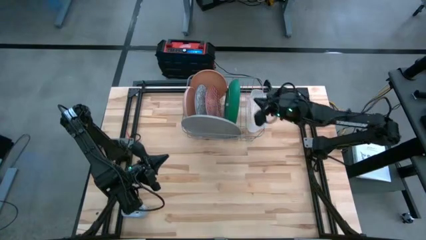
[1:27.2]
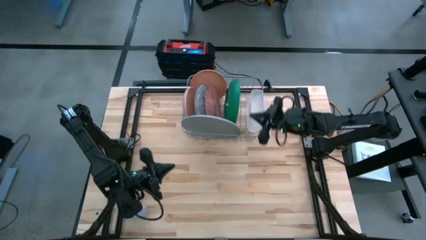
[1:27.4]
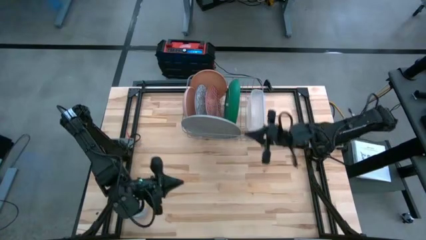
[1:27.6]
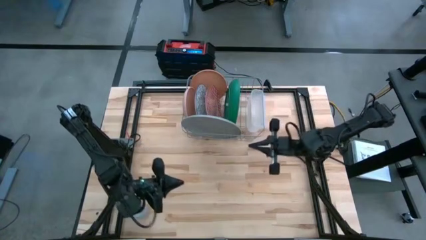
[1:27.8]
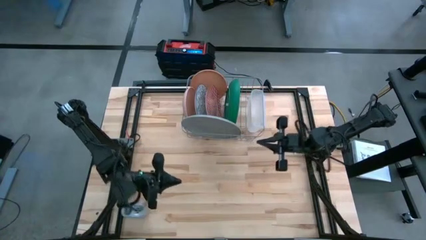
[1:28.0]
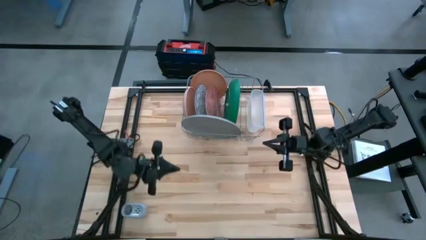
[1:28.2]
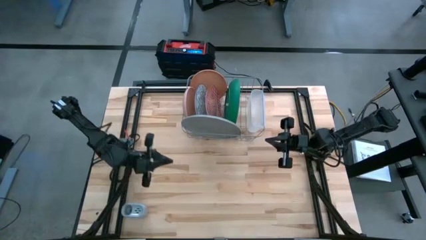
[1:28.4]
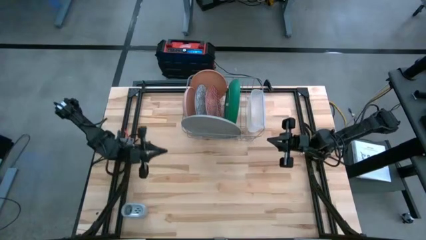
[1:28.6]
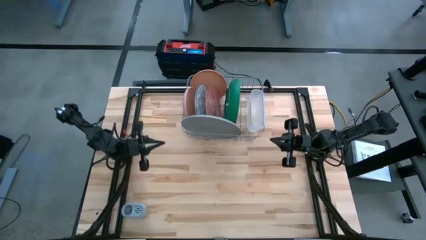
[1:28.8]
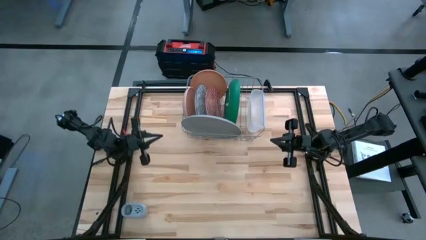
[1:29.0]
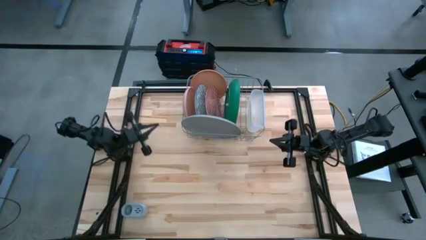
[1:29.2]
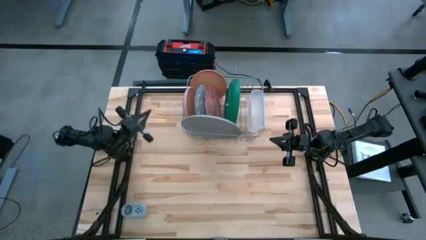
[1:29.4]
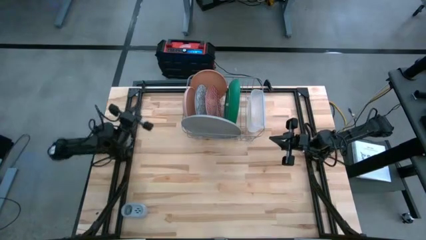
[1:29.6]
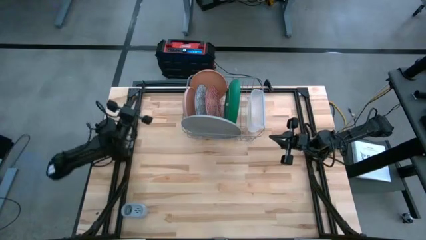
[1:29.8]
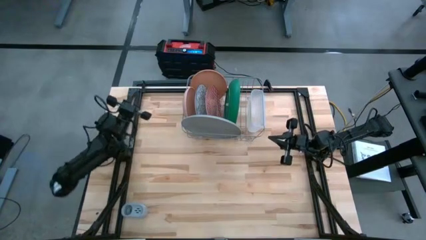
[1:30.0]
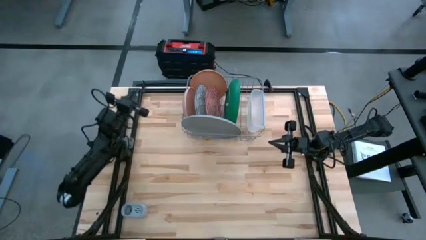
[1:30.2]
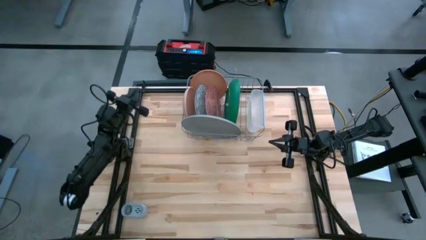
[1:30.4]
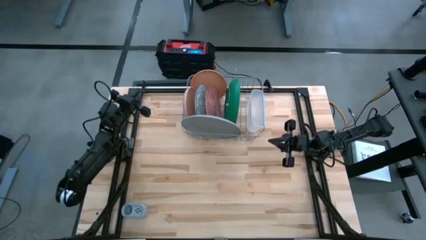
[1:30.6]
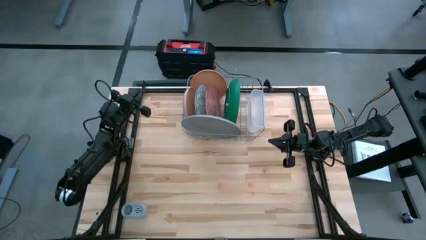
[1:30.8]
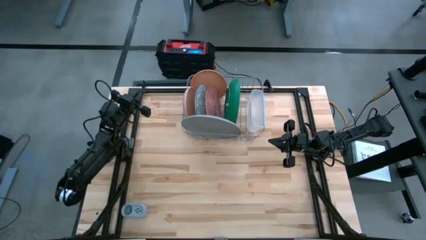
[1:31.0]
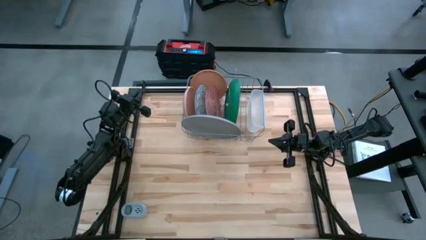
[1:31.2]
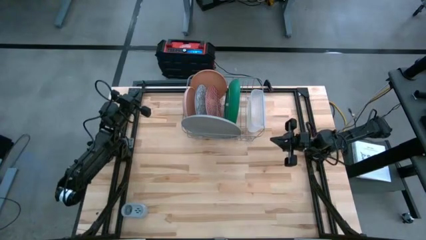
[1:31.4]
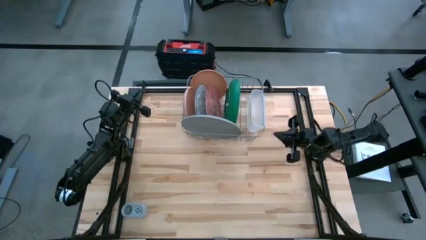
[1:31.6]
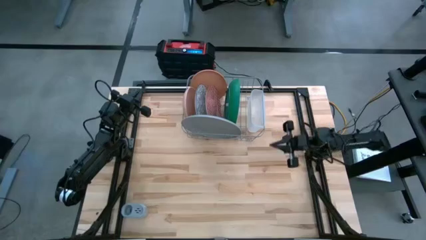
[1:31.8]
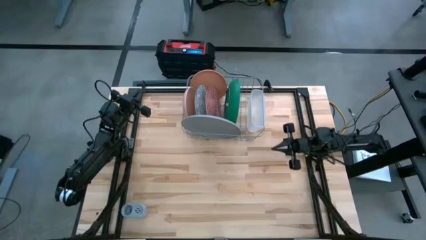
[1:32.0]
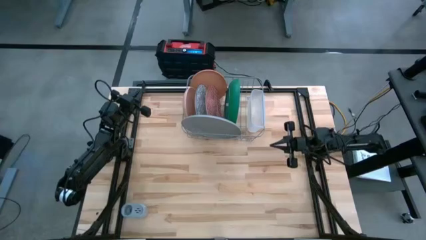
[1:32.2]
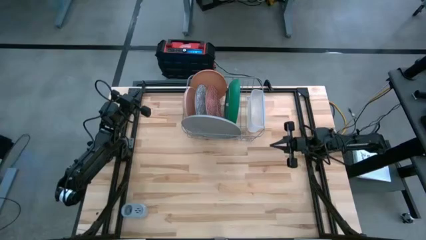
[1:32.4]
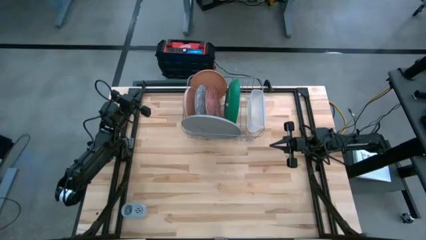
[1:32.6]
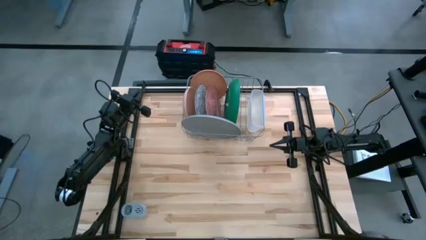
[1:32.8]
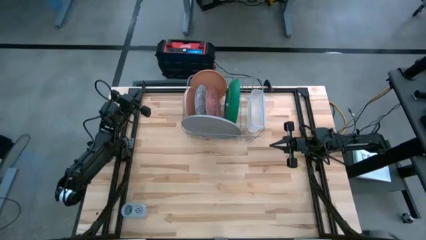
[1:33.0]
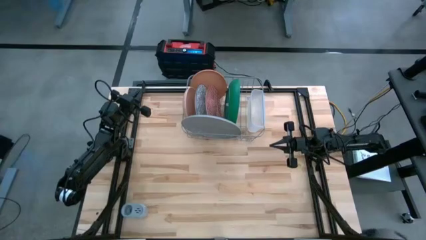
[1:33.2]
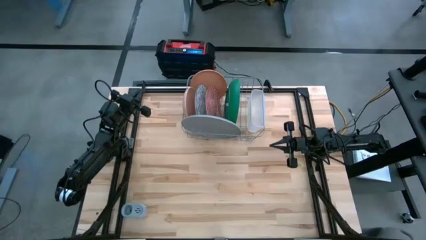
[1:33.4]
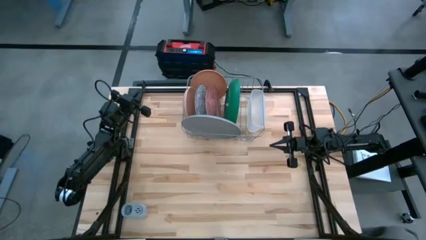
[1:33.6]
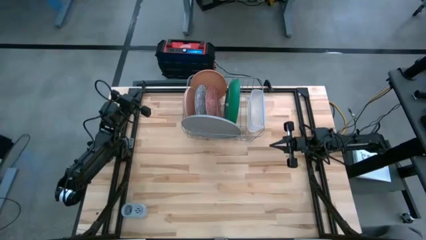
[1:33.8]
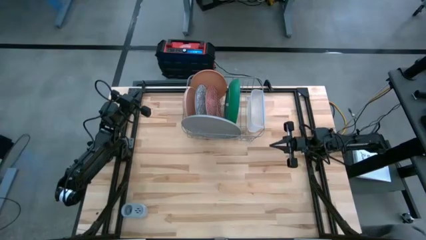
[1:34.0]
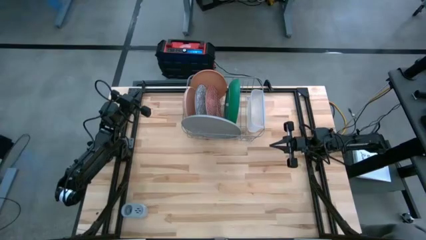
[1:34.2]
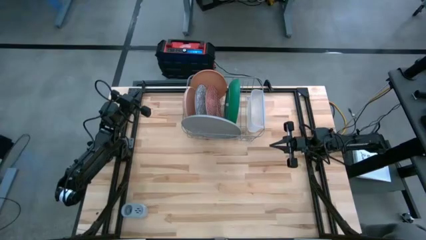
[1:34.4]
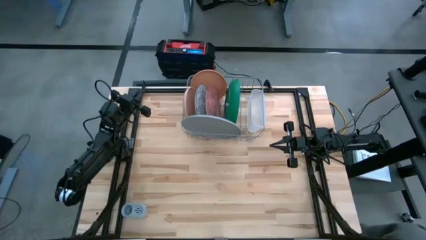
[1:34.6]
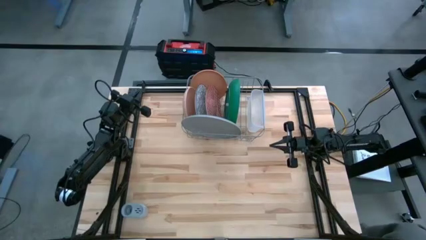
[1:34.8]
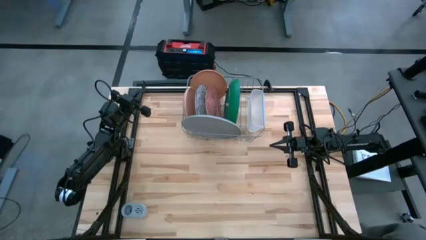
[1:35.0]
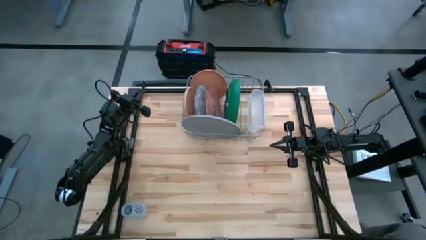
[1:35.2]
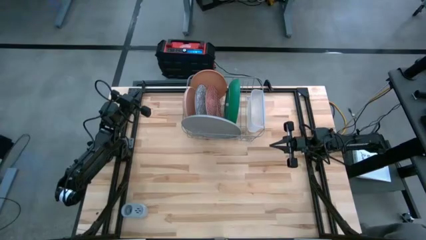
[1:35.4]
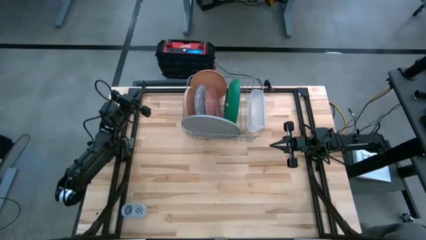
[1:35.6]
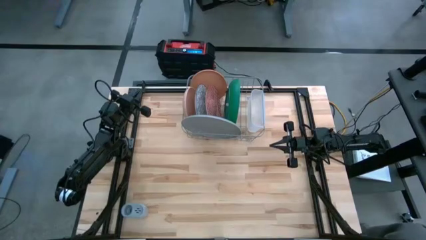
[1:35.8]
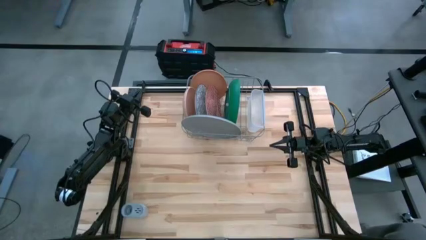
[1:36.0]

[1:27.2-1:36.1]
Task: Sort dishes
Return to Home Position

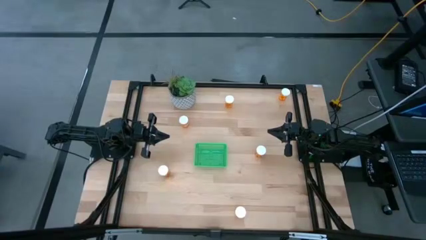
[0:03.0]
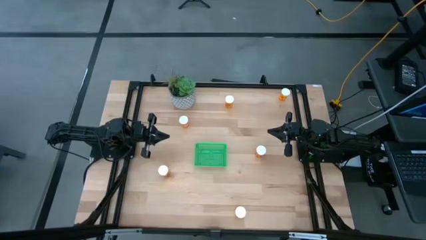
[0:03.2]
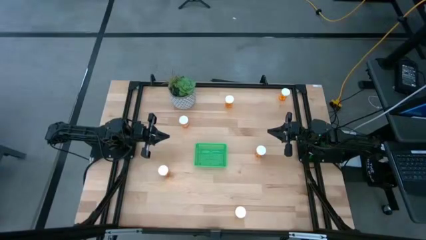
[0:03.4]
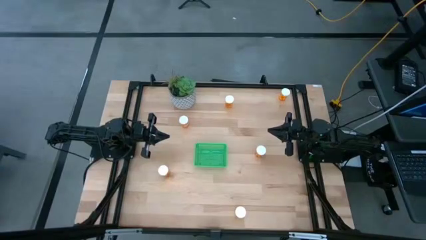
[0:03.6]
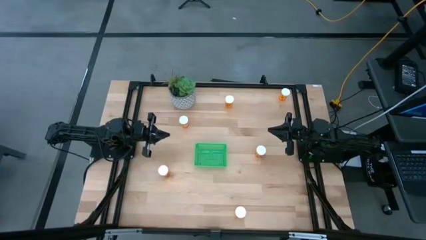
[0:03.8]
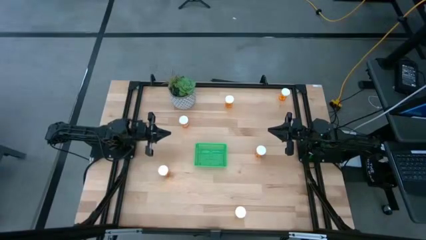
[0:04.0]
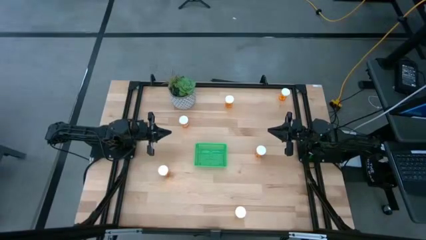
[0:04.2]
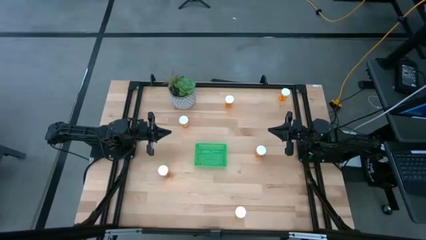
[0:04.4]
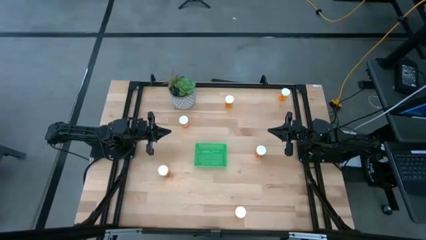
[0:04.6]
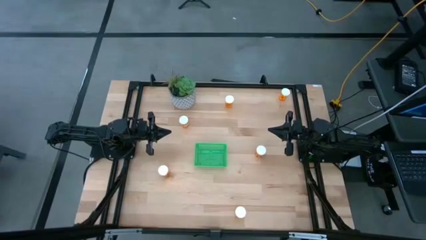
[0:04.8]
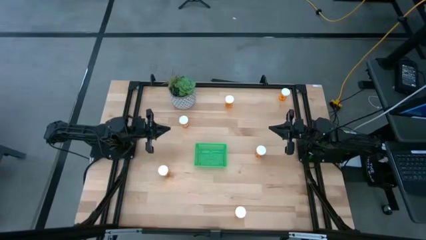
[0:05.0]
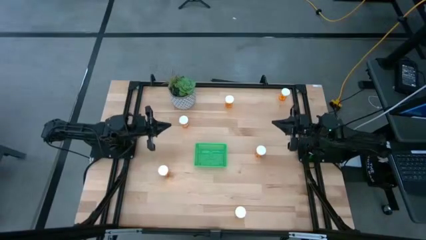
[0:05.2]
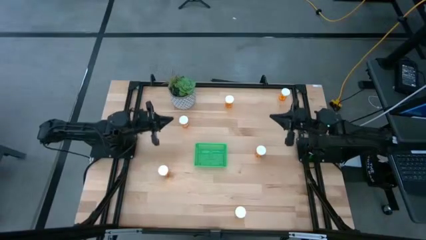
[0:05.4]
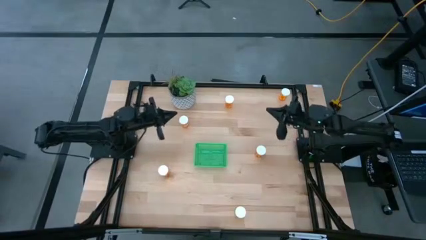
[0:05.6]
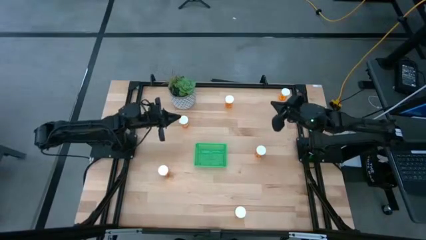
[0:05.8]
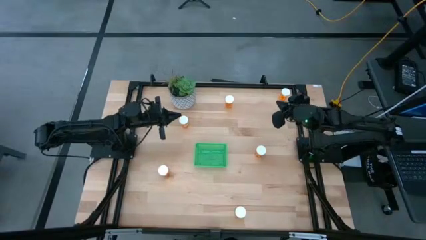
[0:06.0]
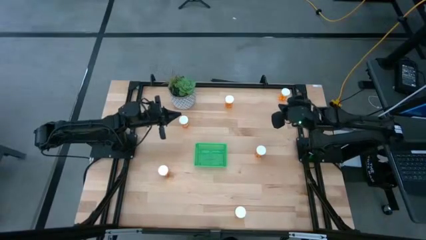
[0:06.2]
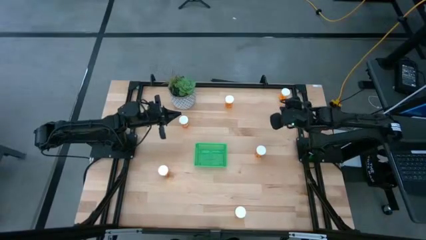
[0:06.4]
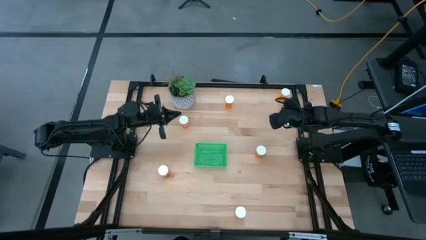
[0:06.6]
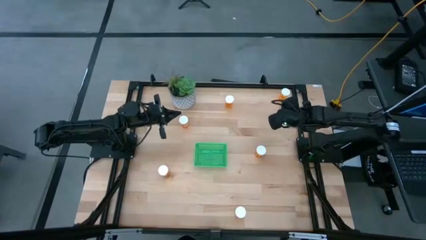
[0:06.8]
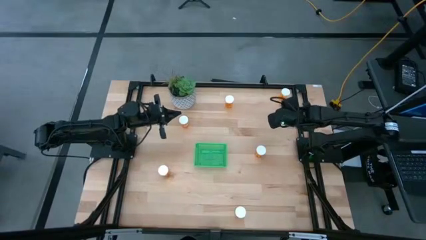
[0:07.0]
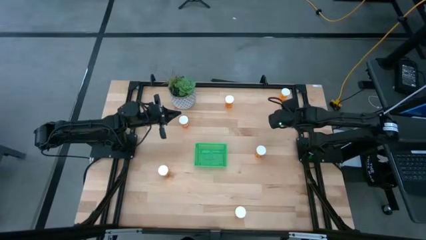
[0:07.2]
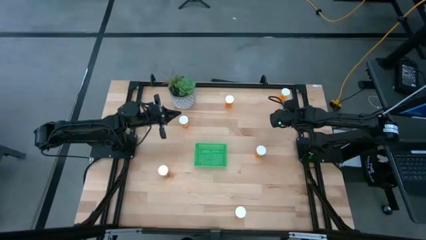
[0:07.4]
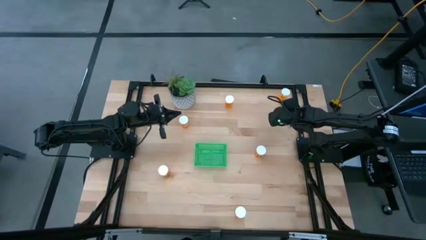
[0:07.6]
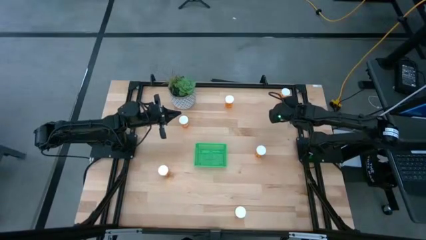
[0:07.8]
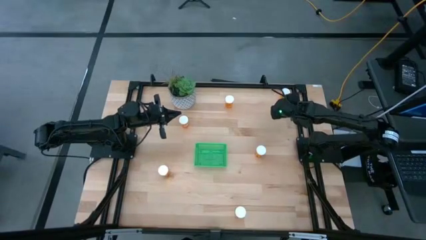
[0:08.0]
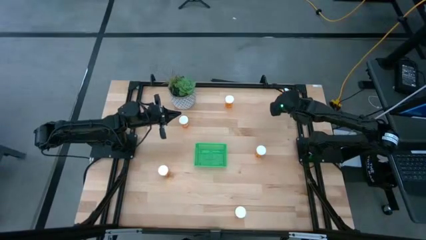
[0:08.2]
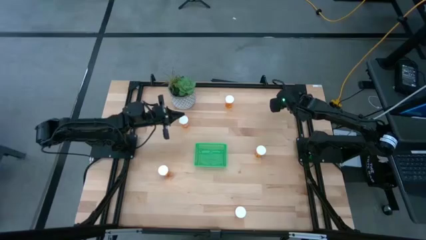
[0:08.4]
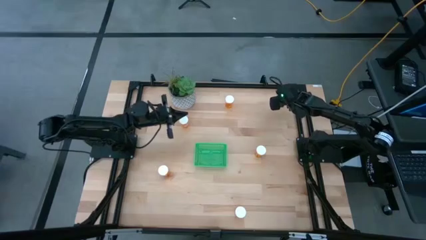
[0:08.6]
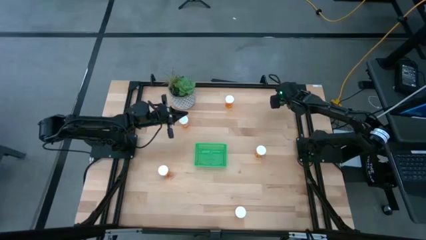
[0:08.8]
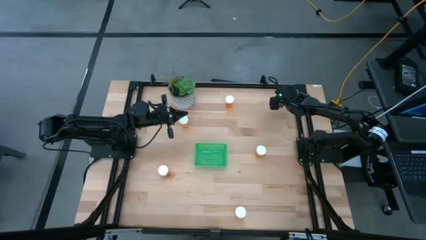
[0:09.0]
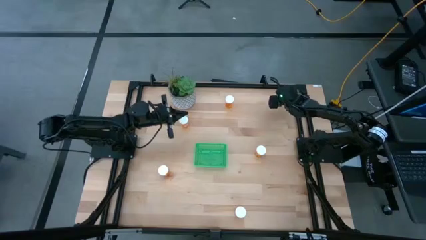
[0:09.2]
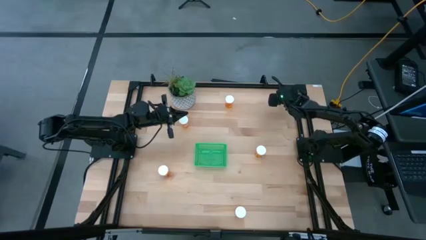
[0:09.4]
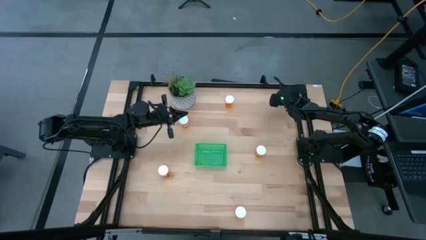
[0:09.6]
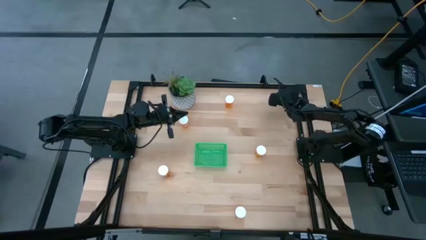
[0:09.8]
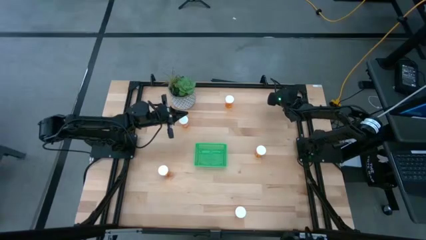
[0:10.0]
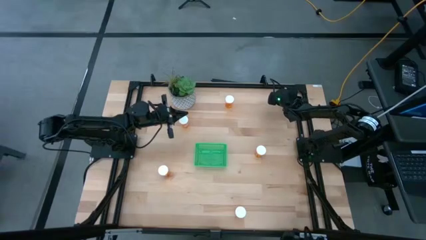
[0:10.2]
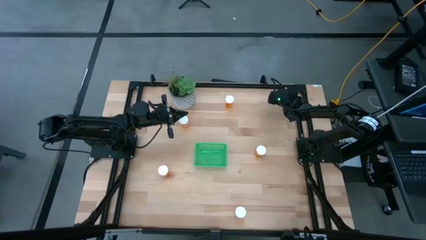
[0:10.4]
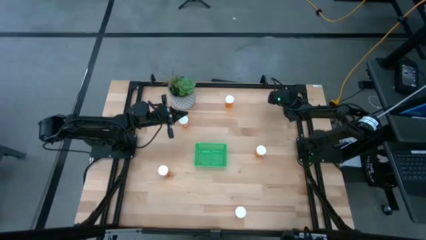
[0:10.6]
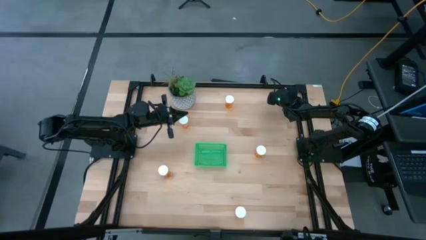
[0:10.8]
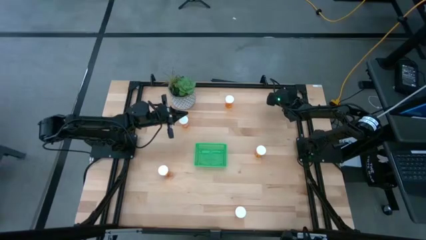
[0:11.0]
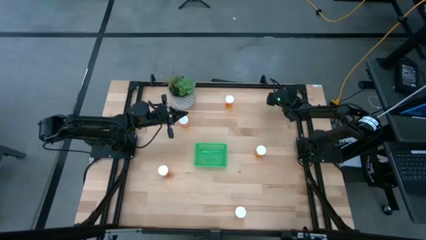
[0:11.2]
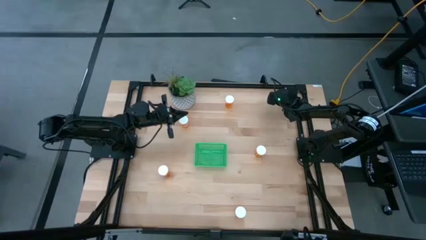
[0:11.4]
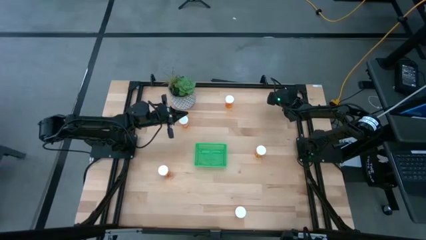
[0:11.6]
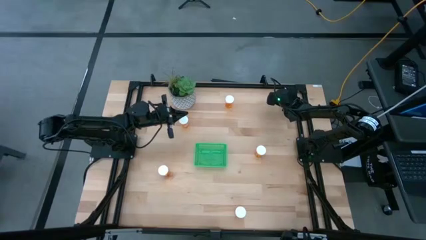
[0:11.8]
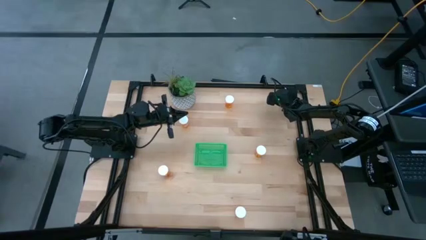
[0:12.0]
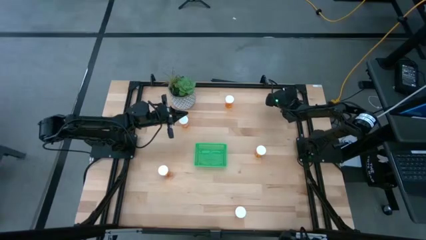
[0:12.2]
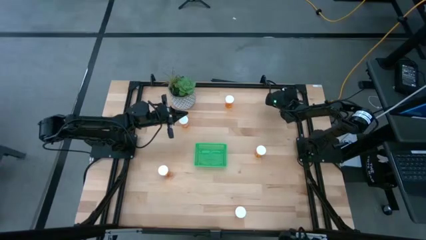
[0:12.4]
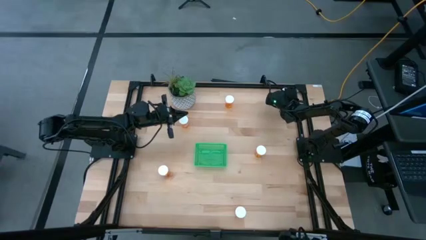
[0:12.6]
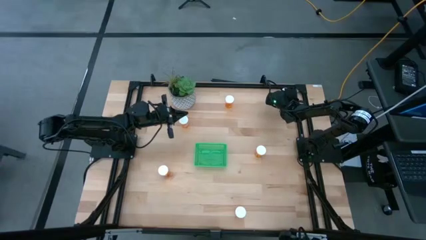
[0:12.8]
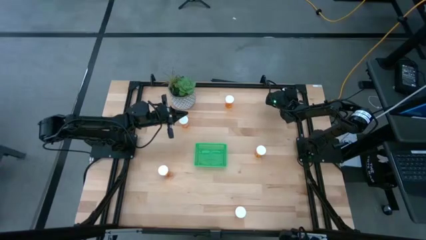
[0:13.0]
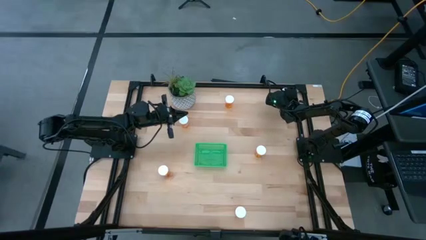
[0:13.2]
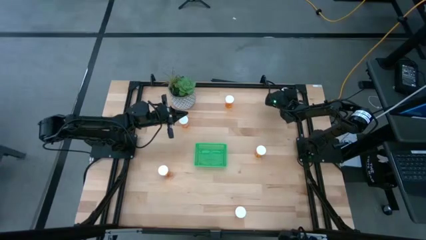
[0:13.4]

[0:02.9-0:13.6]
Task: Pick and place pill bottles into a basket
Put the orange medicine bottle into the green bin
